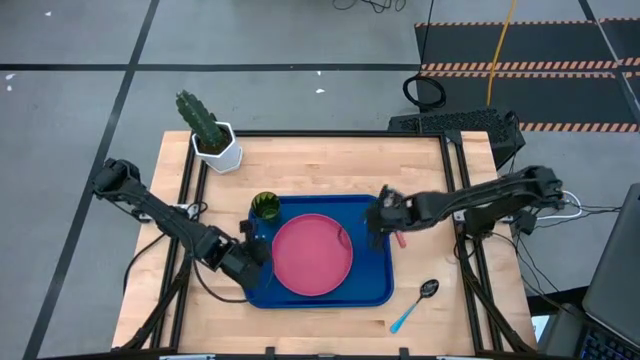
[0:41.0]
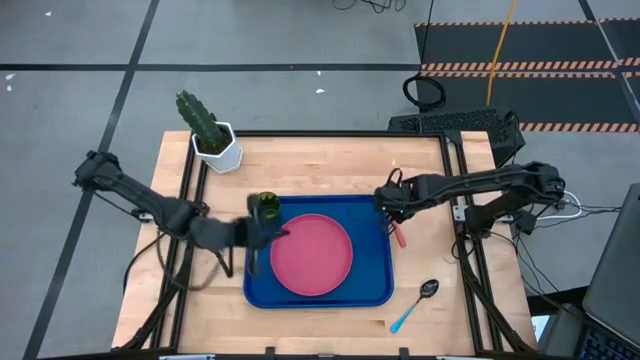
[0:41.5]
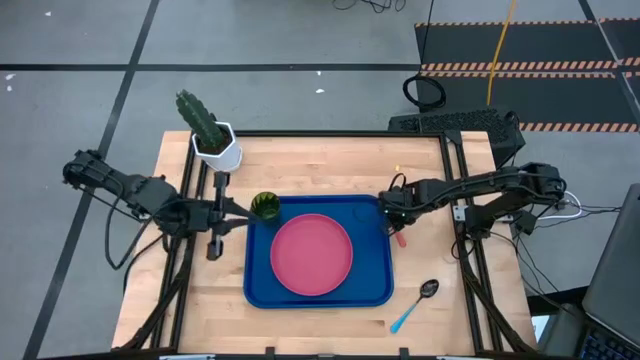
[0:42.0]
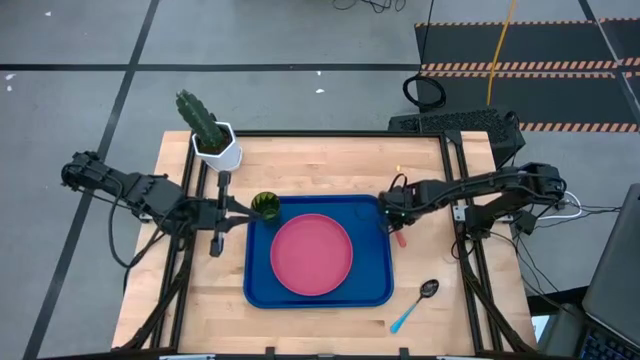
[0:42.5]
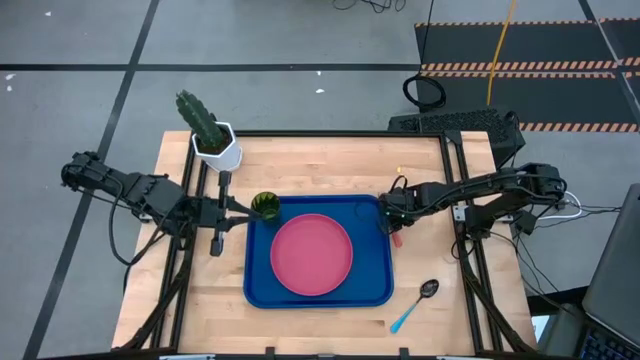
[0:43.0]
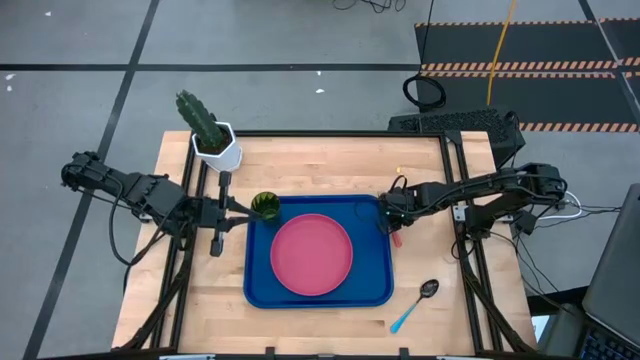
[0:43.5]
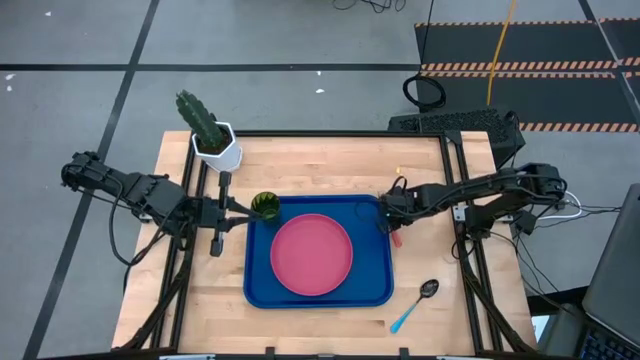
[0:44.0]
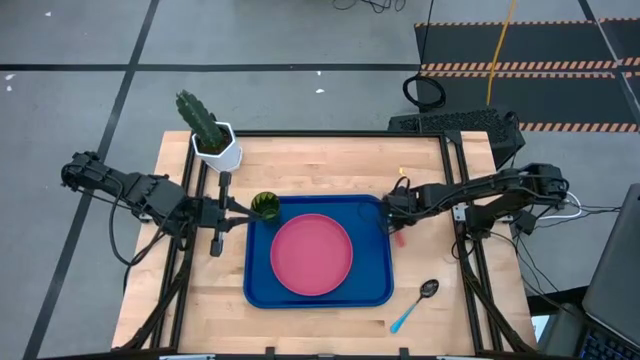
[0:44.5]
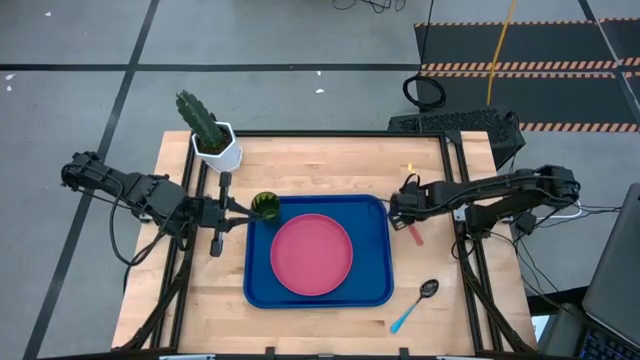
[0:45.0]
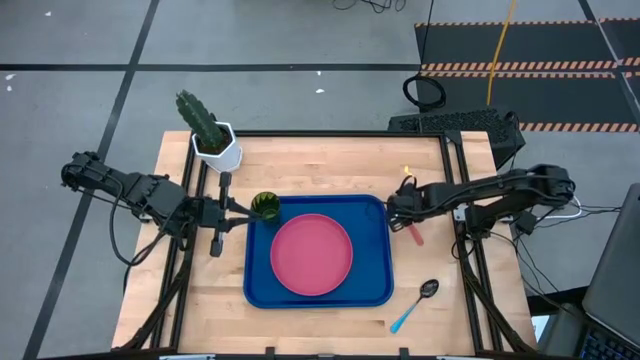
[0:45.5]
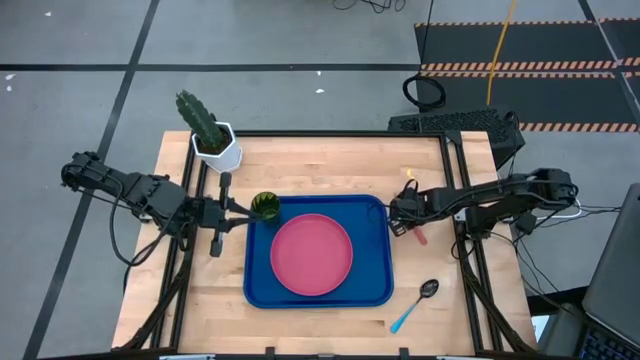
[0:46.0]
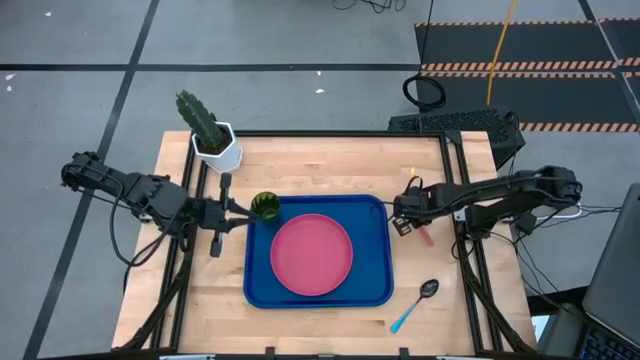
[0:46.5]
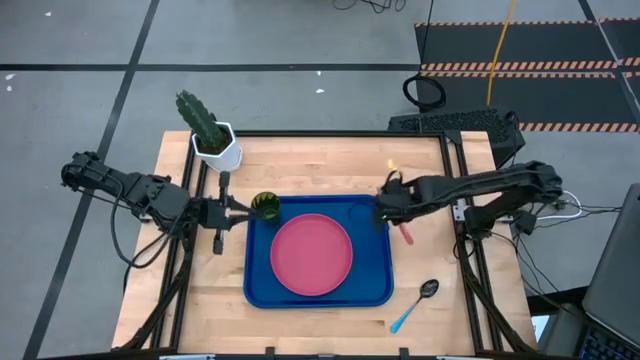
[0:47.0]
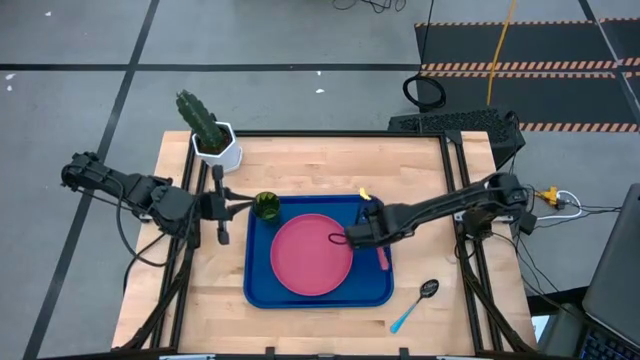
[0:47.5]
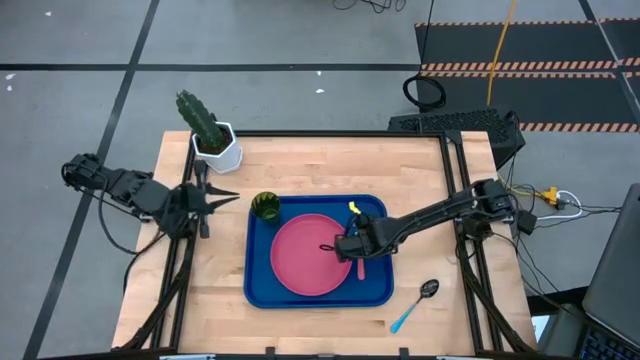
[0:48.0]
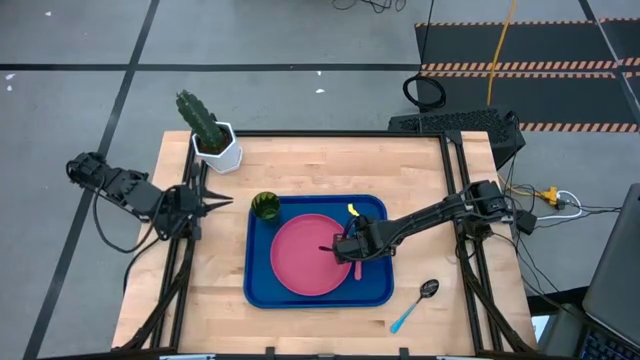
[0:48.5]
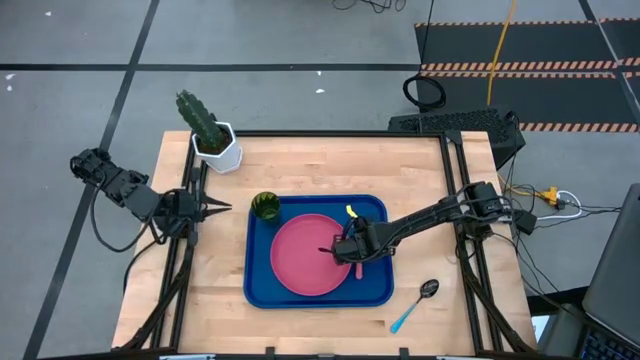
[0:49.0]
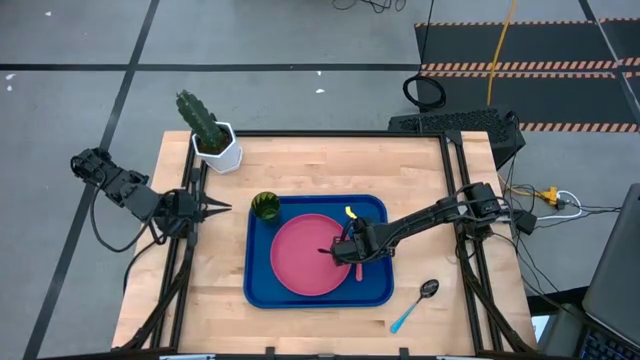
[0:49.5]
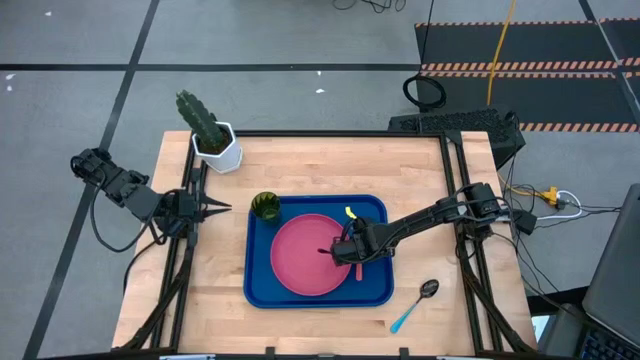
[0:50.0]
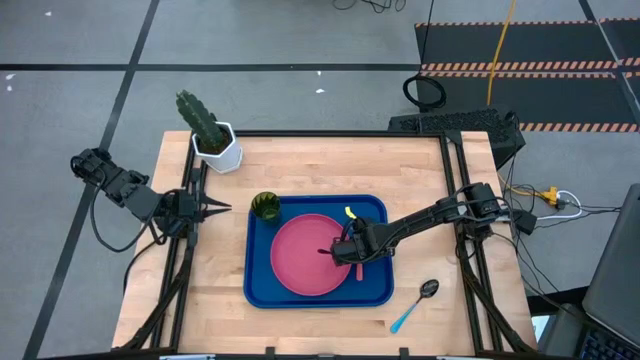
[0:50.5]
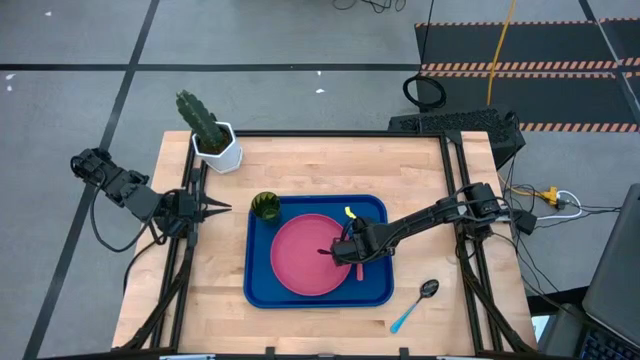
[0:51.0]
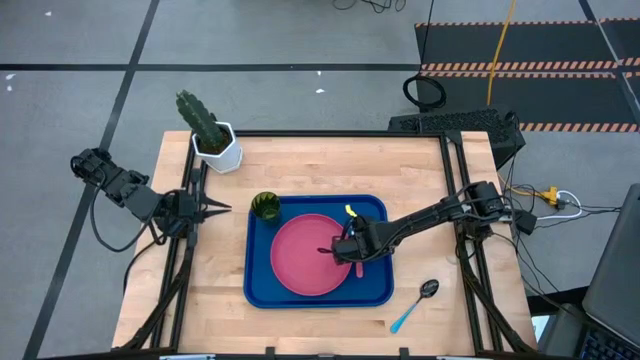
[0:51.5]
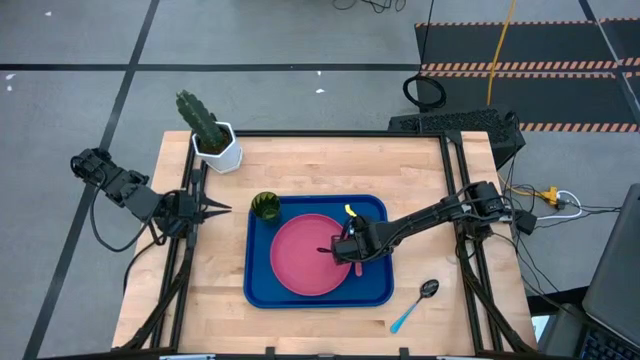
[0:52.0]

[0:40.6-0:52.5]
Task: Pick and place plate/cup/fork/spoon on tray
Put the pink fork on the right side of the plate on the blue serving tray

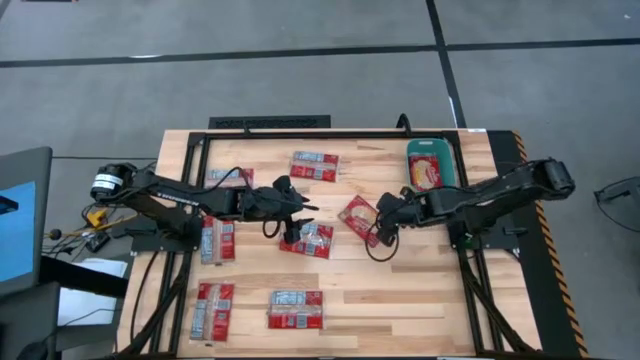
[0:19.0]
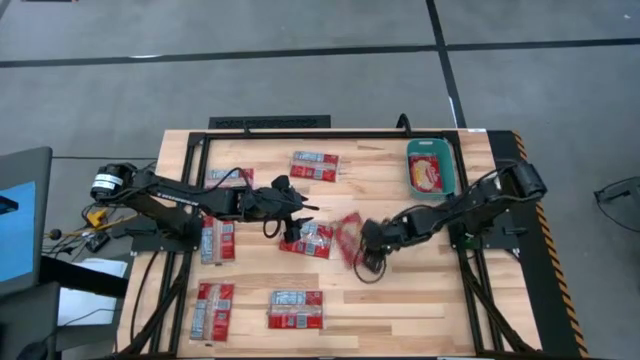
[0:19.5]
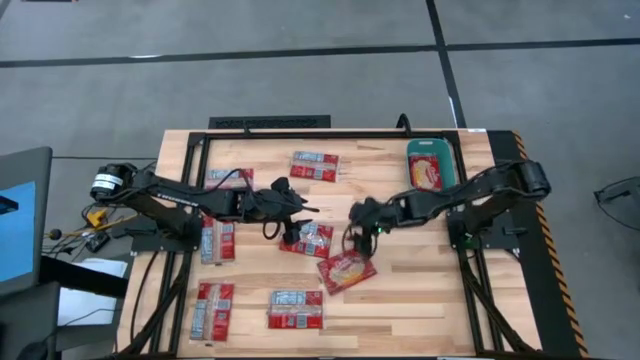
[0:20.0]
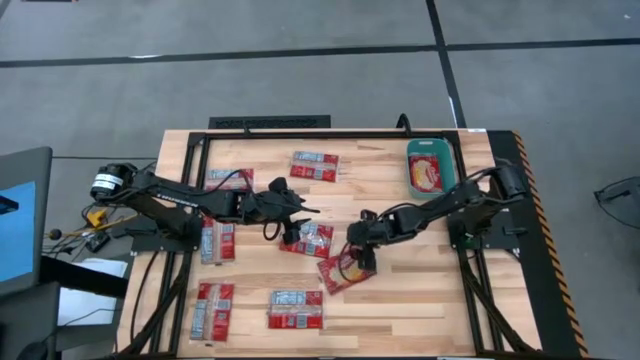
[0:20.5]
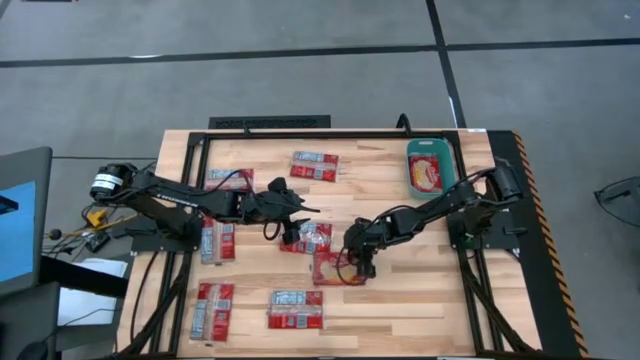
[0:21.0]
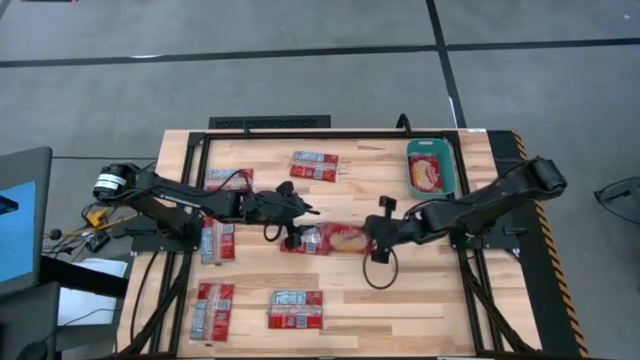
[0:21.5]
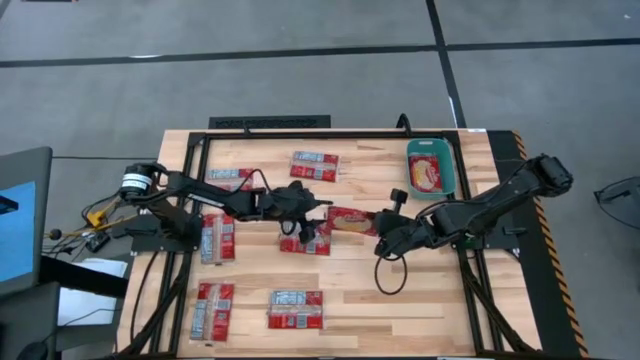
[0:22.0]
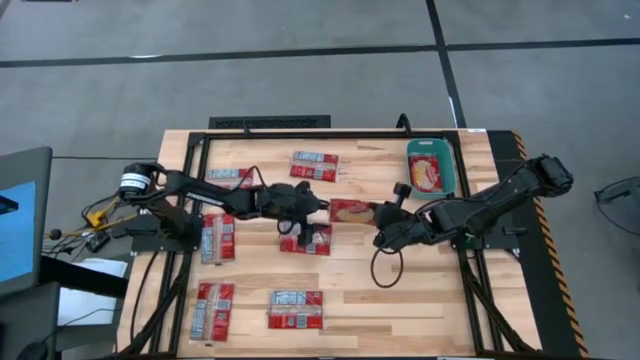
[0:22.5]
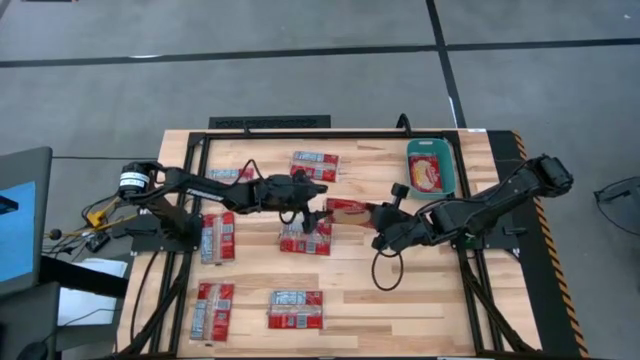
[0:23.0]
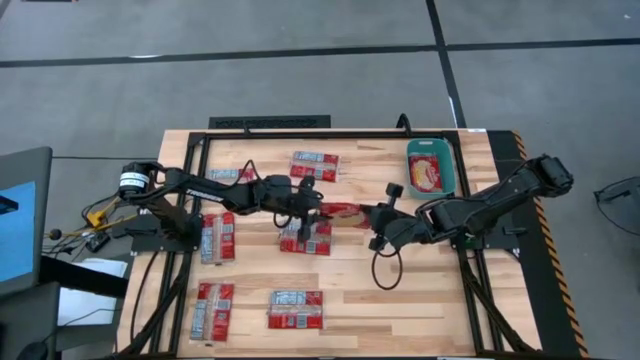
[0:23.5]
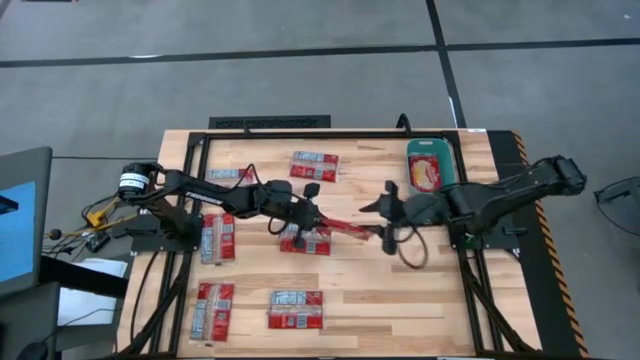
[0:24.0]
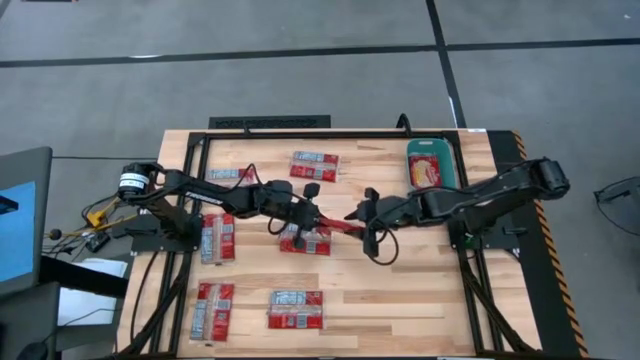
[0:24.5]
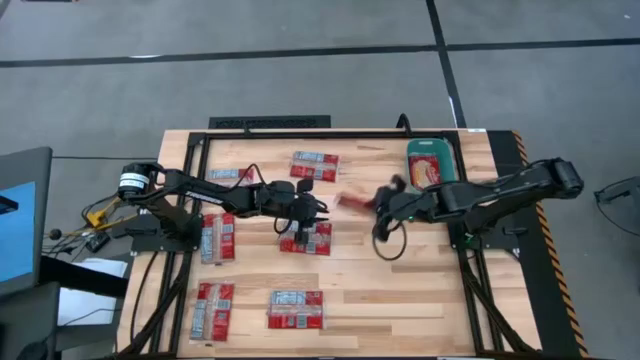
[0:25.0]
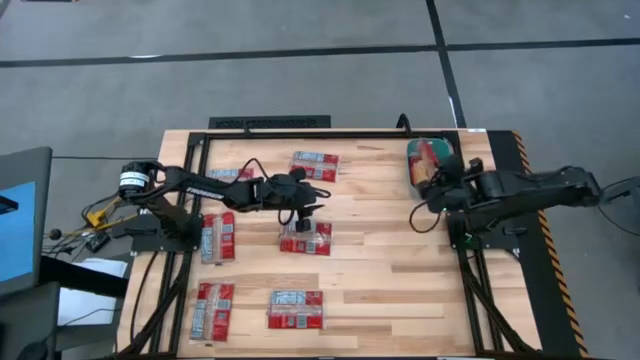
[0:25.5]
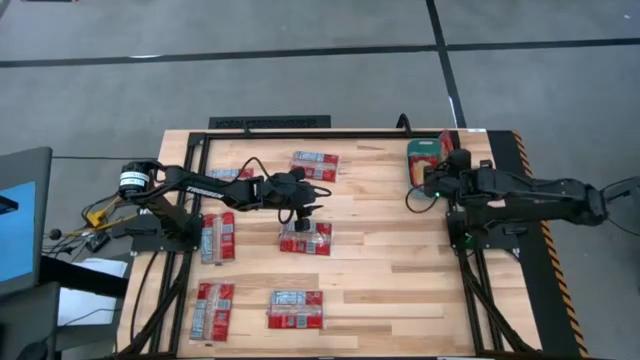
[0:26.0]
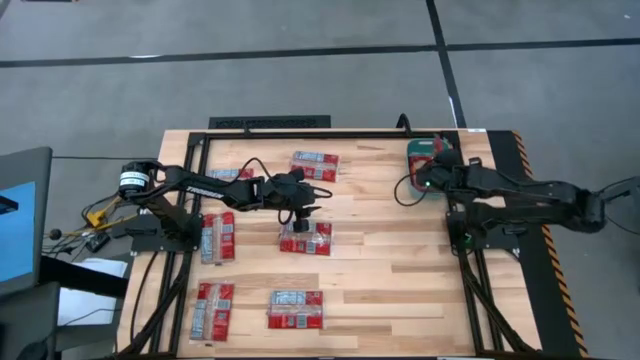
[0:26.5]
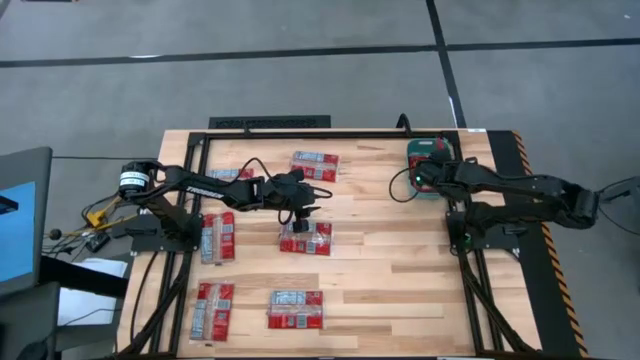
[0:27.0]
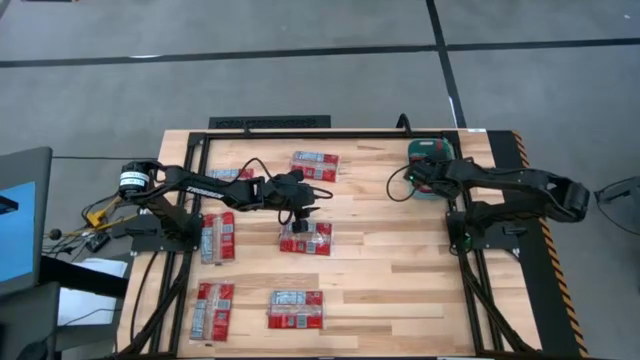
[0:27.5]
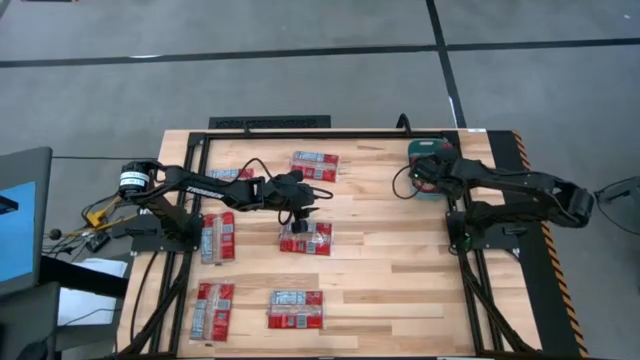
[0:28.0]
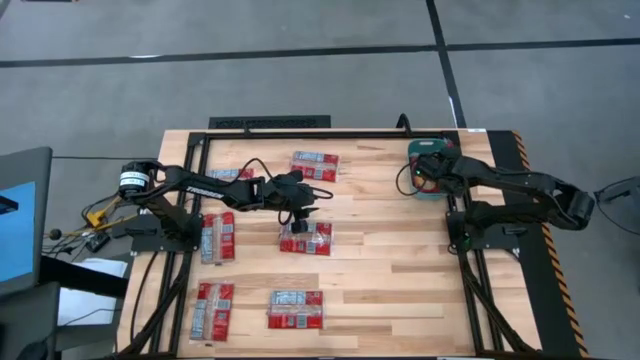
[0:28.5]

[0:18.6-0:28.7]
Task: Sort popcorn bags into baskets
Put the popcorn bag into the green bin
